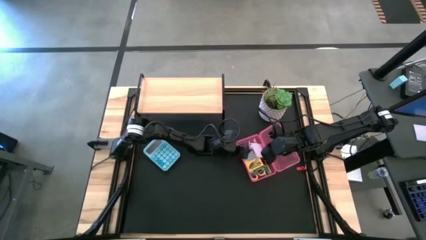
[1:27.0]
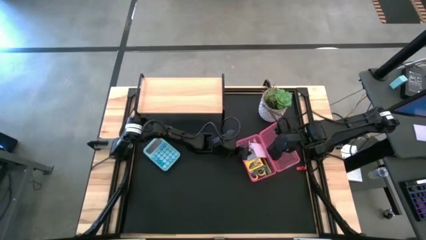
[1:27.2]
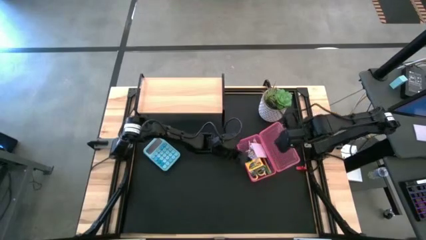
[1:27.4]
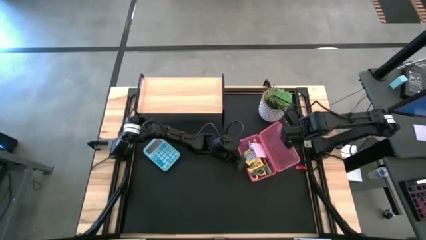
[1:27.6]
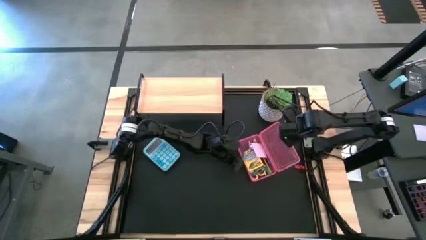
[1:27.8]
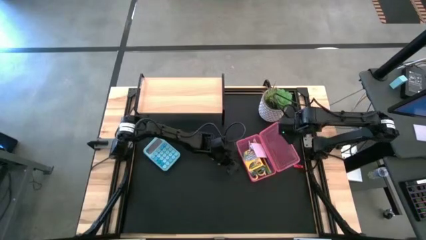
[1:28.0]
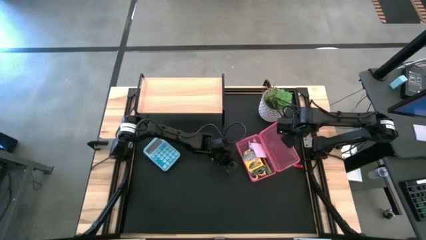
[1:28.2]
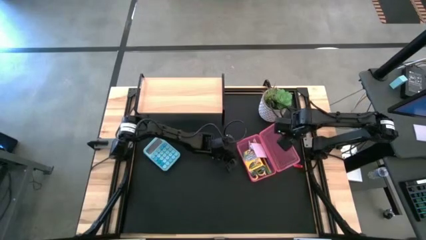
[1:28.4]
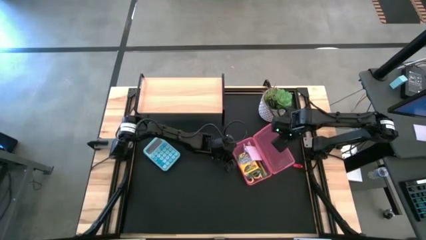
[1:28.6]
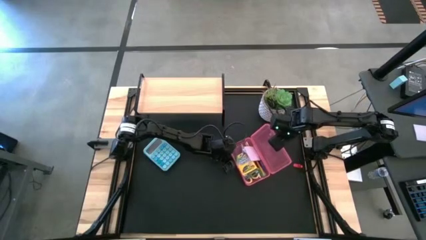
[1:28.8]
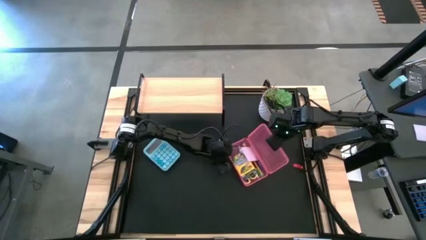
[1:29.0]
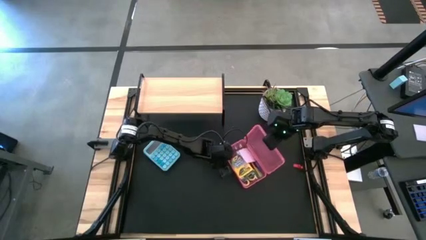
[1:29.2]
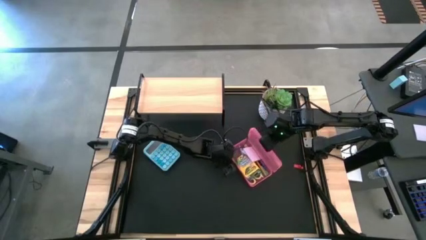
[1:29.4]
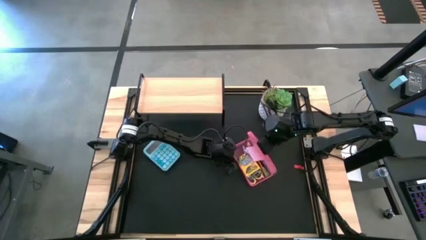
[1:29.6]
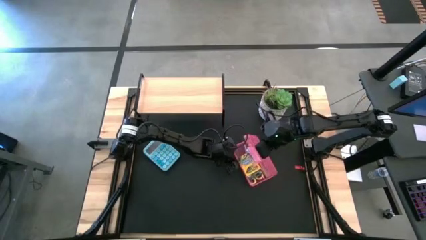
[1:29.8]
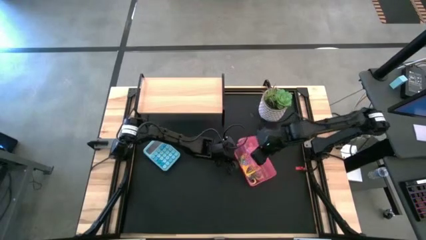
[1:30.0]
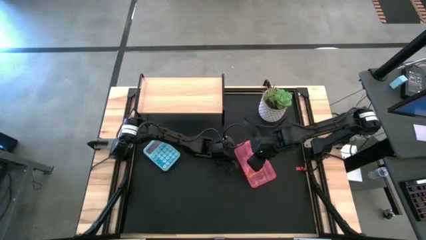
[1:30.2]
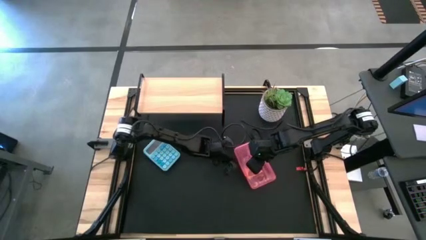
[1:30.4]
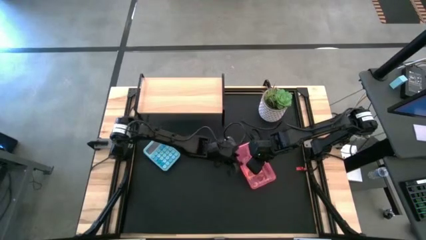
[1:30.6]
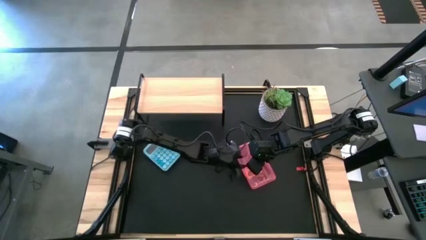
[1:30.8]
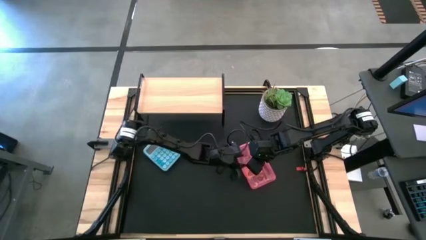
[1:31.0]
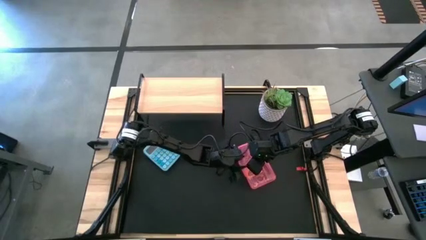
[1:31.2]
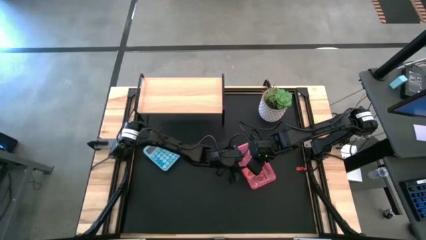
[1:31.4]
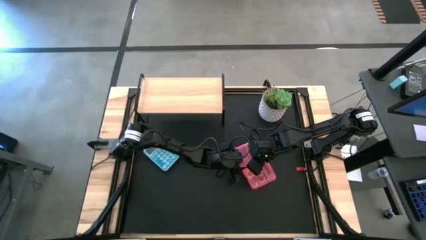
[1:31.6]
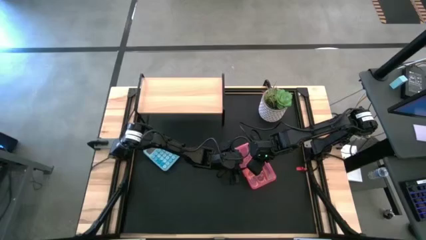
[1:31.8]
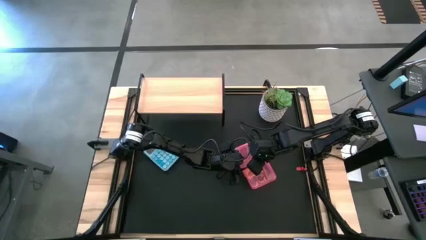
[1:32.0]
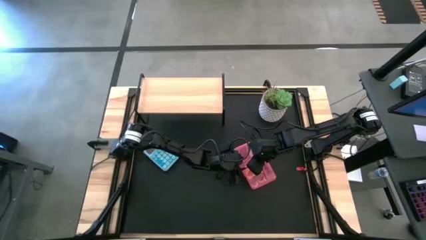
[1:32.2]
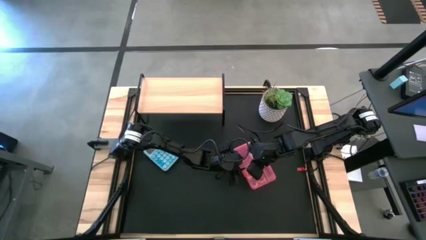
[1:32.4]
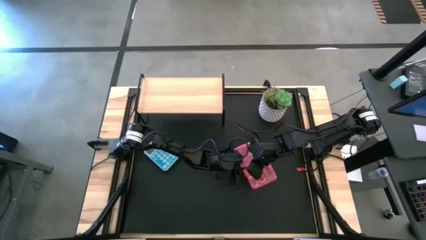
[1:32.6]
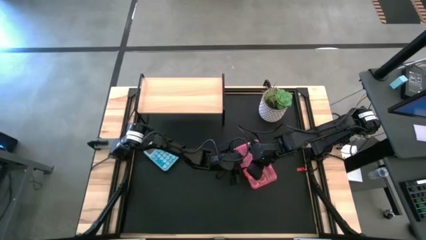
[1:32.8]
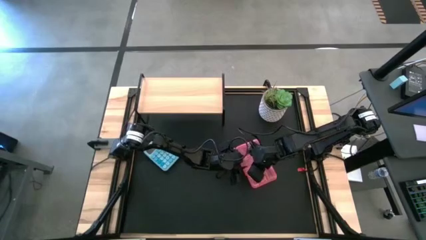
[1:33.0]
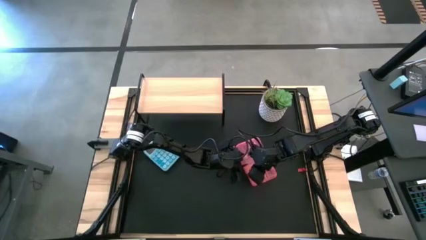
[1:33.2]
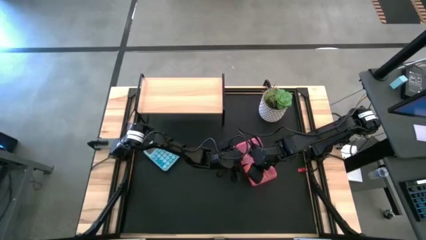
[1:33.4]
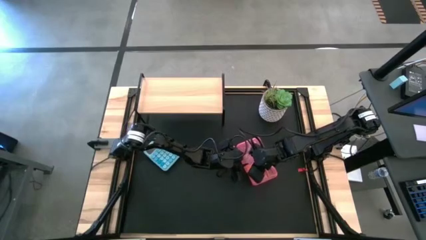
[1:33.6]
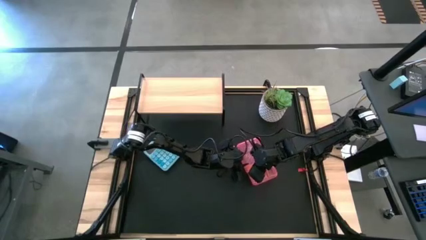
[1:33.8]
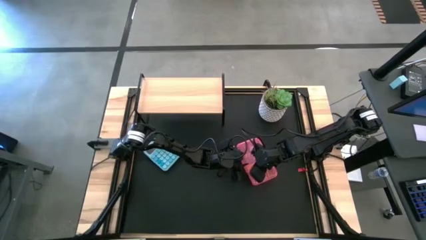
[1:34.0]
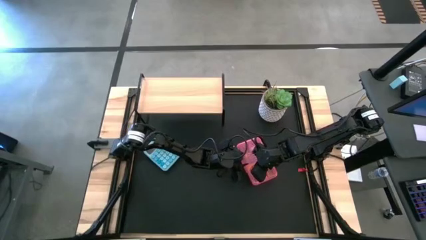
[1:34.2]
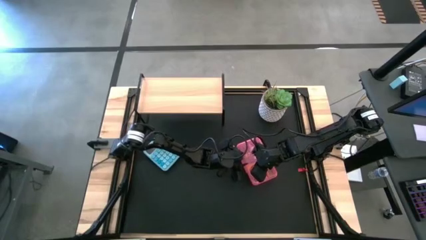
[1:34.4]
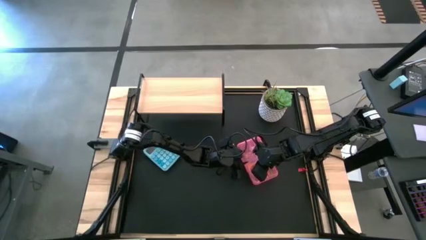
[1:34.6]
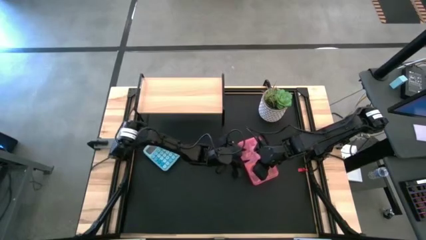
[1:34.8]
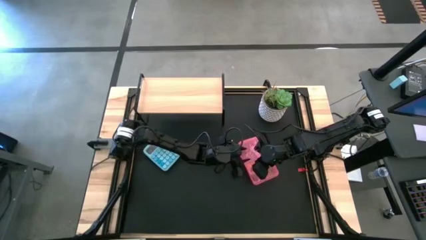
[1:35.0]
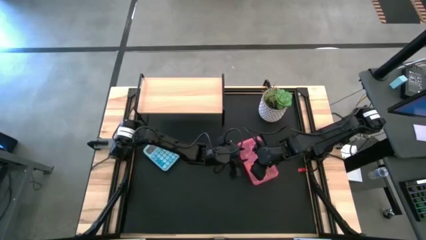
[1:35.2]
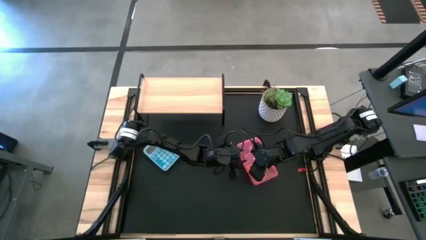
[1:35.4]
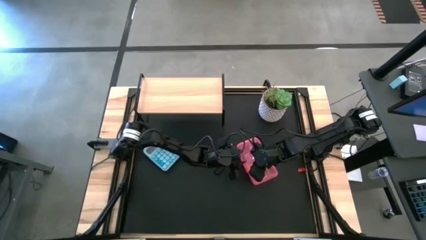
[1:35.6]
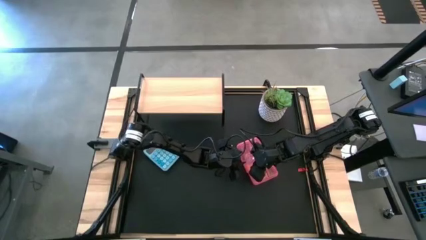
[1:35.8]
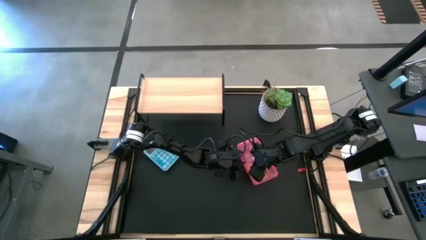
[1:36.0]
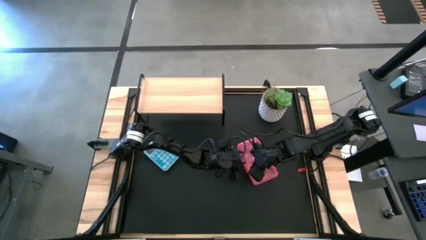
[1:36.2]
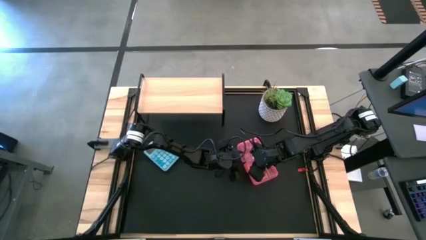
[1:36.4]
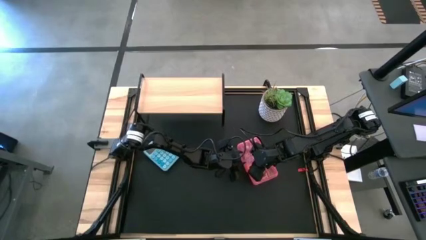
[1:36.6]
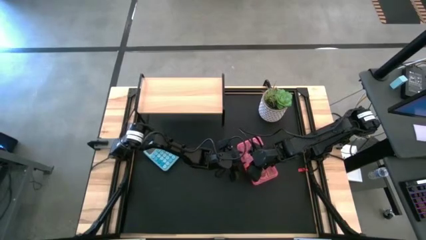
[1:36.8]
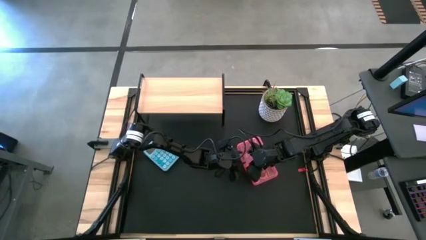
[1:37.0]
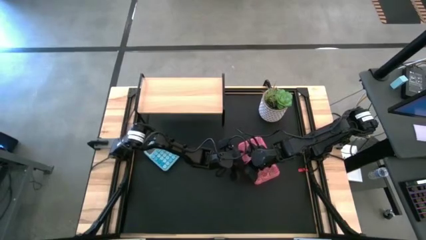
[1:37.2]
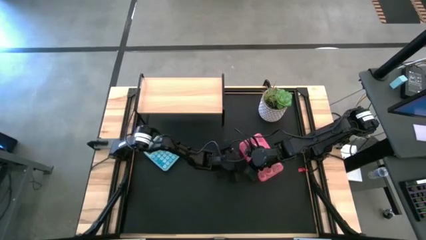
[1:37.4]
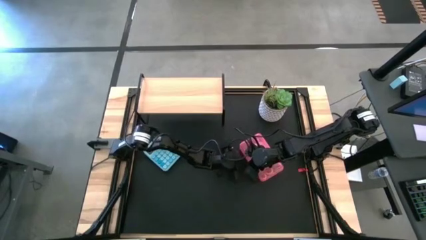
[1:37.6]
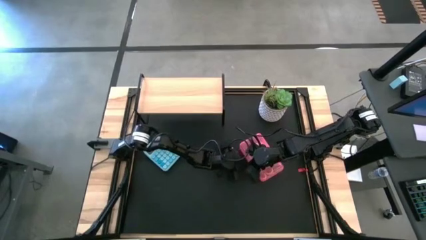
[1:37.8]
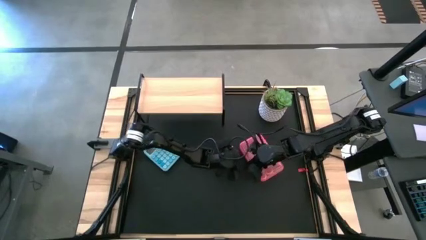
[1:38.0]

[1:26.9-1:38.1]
Task: Pack school essentials
Close the pink supply box

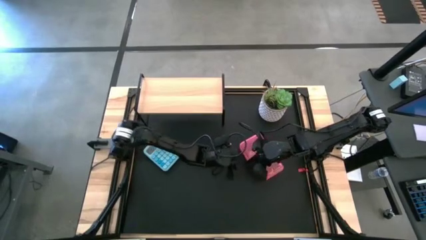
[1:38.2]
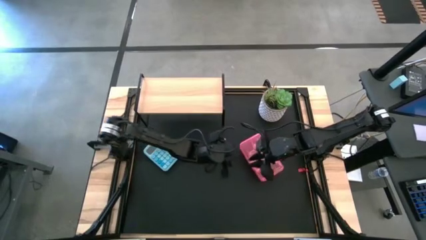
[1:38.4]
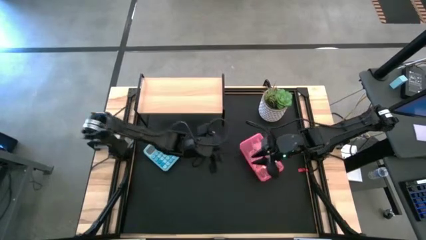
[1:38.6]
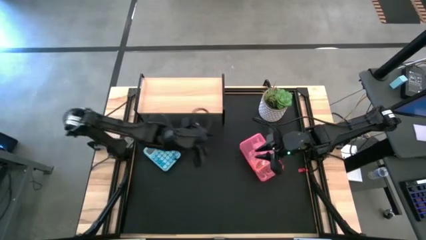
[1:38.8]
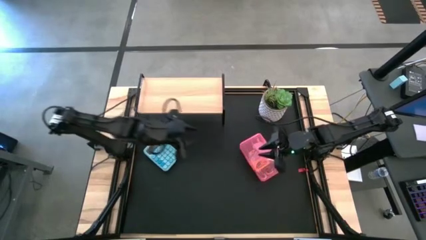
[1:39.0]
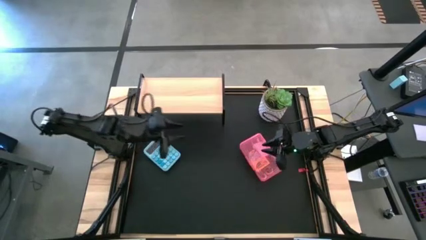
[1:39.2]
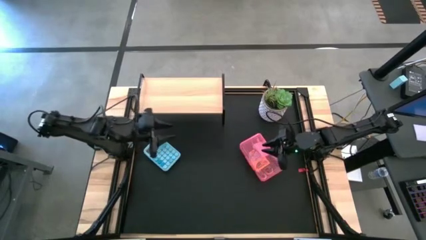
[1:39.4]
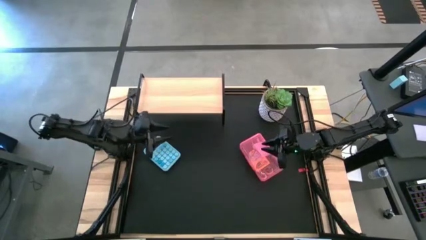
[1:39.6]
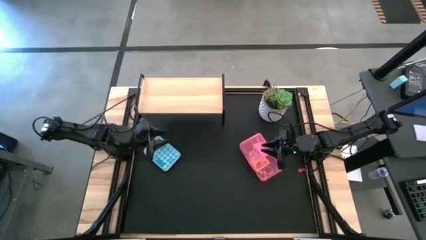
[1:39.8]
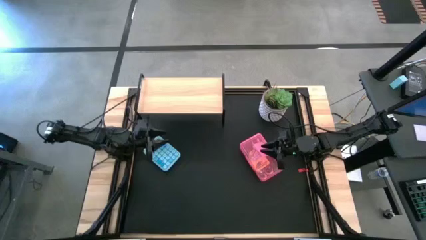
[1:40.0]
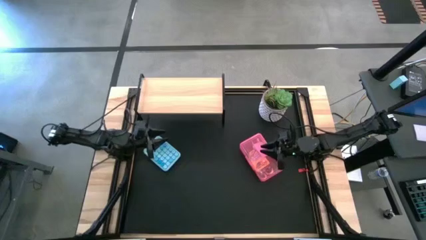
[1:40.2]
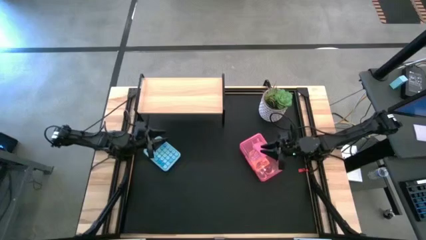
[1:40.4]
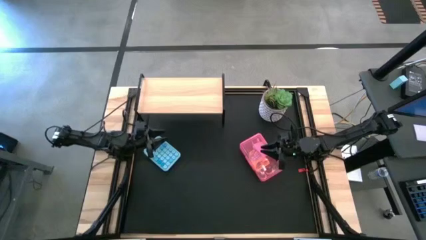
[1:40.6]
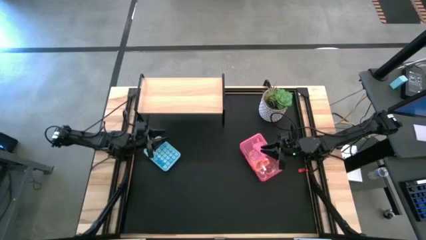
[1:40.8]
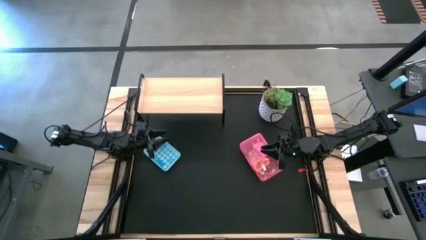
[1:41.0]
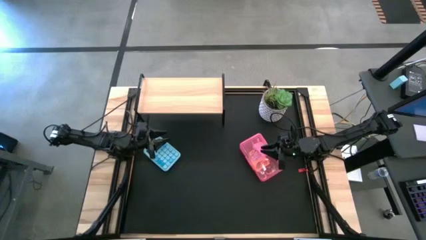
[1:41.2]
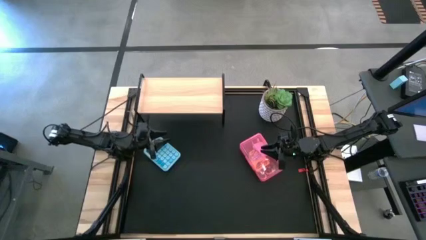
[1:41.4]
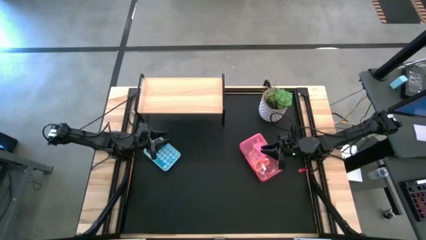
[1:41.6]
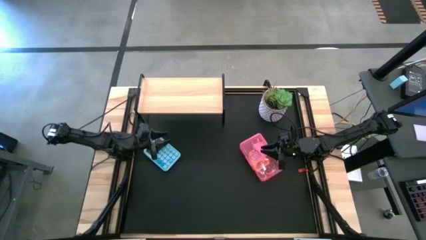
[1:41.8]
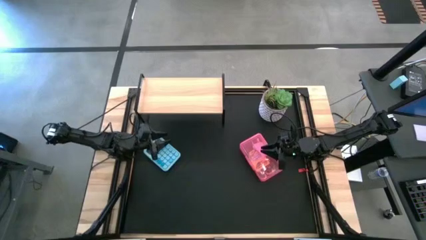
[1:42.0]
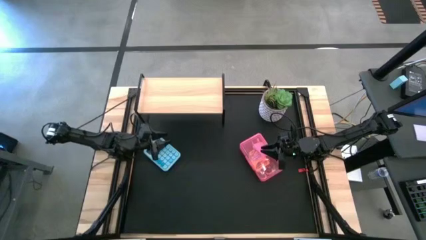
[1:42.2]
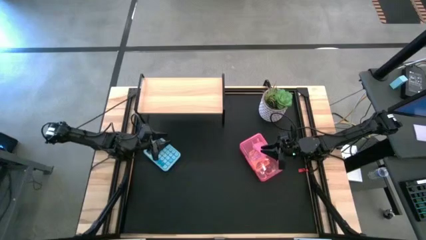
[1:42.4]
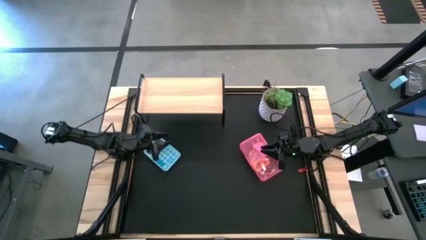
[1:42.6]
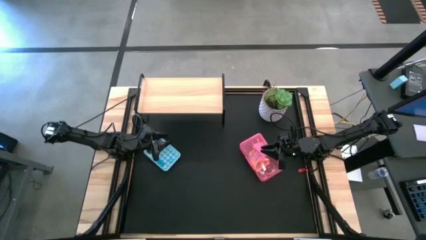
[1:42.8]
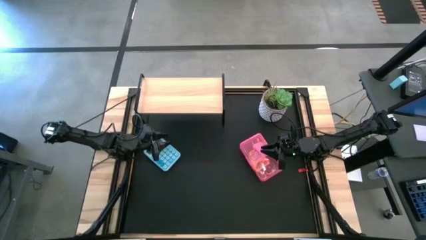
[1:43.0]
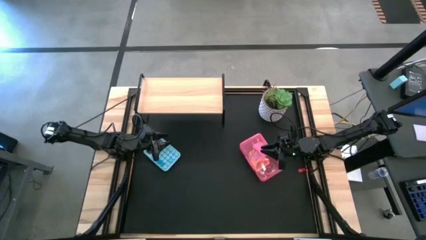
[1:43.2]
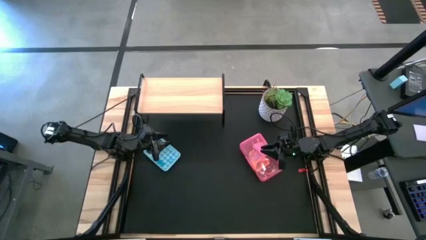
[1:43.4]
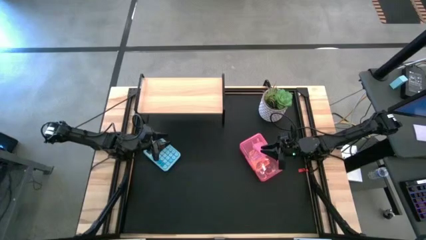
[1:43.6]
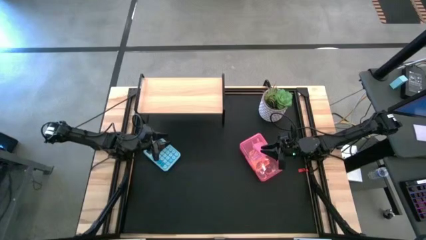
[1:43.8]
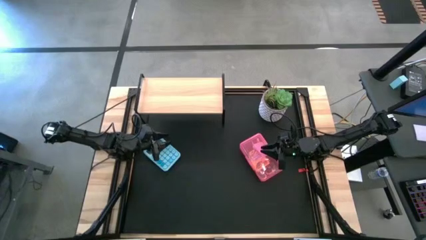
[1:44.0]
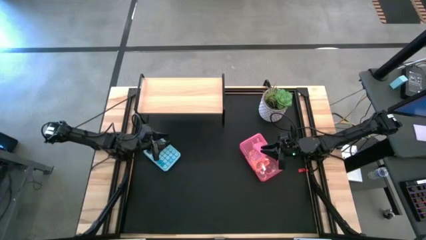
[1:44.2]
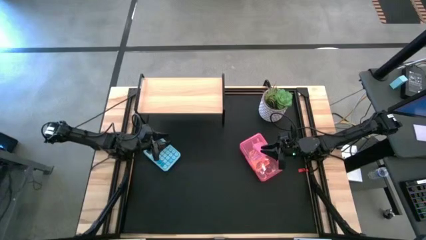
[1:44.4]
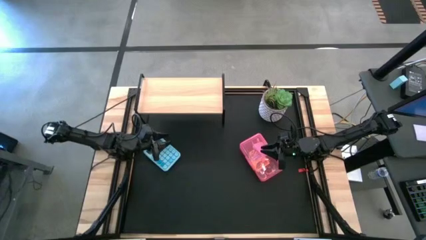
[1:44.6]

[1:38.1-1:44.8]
Return to Home Position
